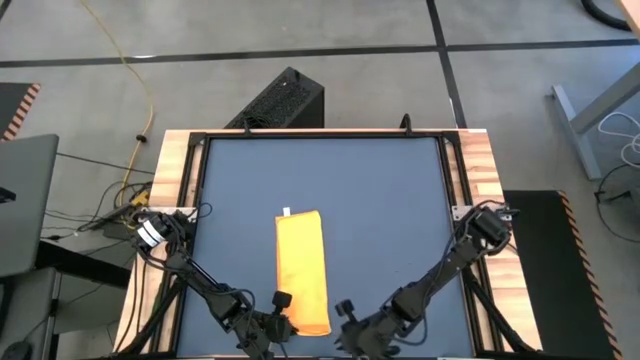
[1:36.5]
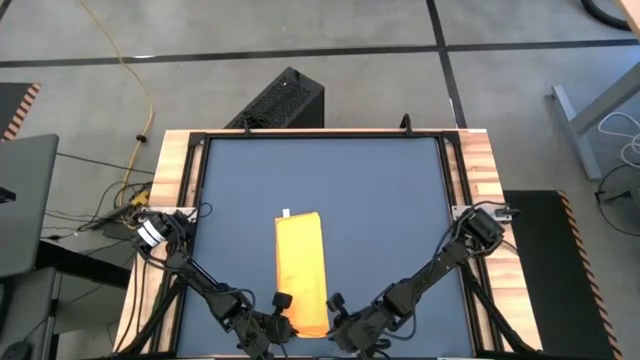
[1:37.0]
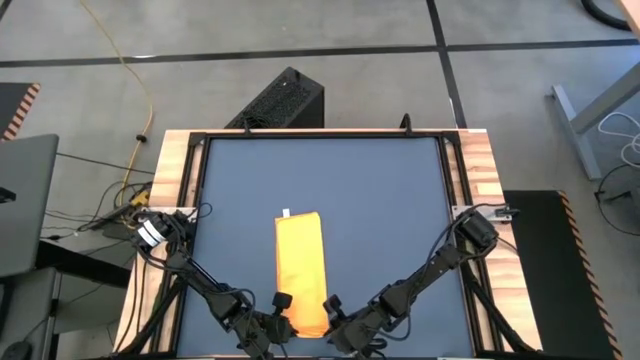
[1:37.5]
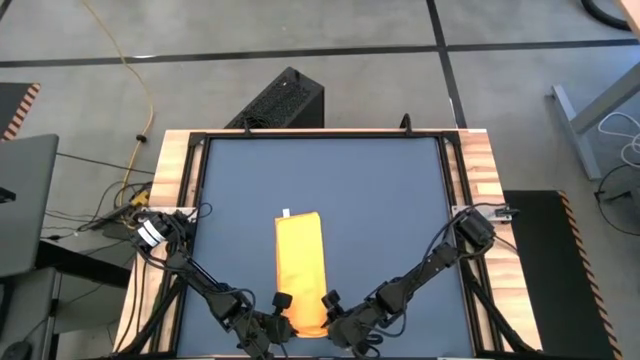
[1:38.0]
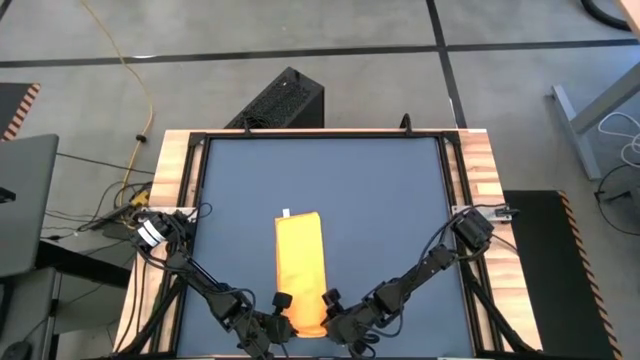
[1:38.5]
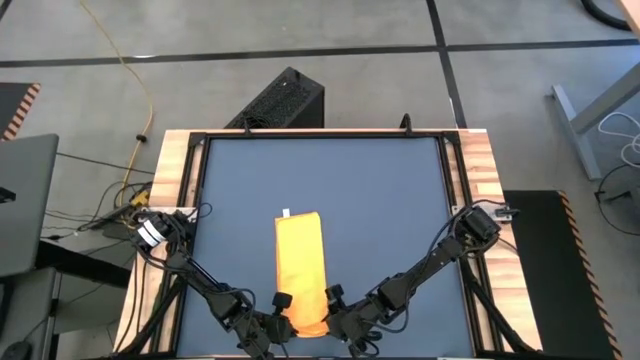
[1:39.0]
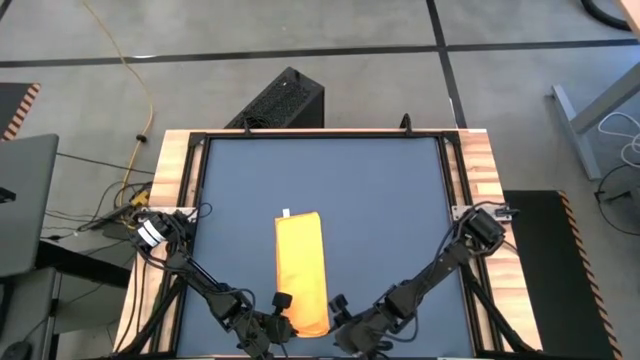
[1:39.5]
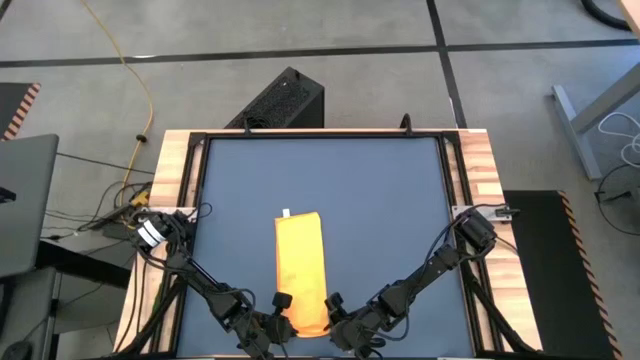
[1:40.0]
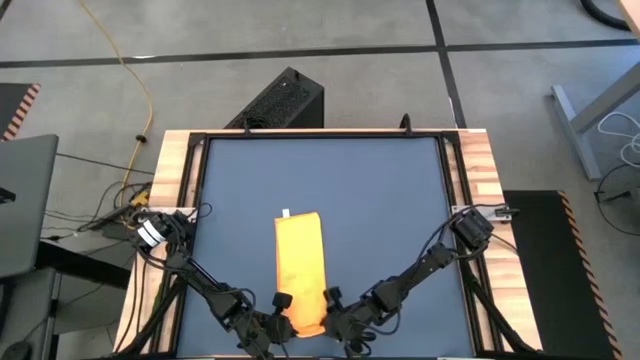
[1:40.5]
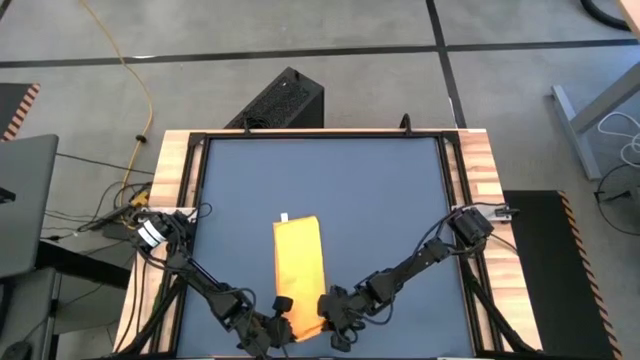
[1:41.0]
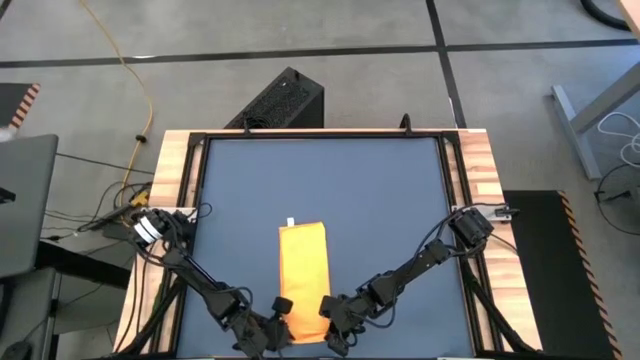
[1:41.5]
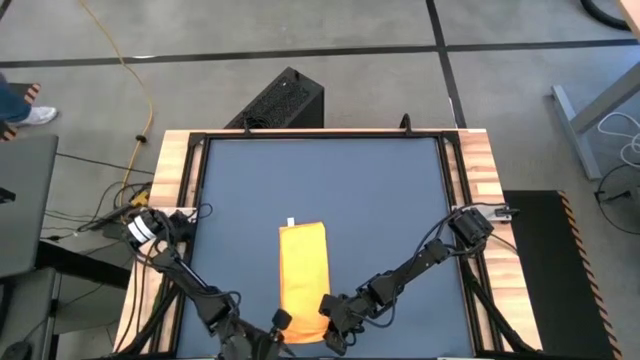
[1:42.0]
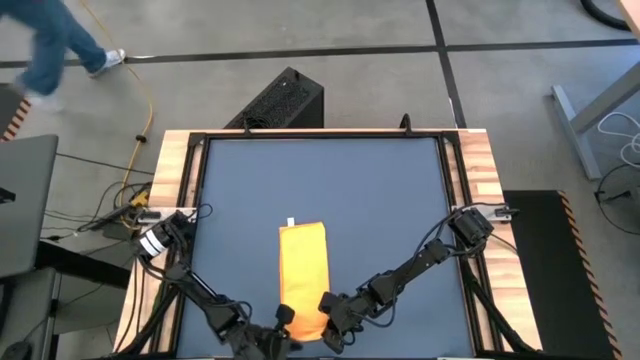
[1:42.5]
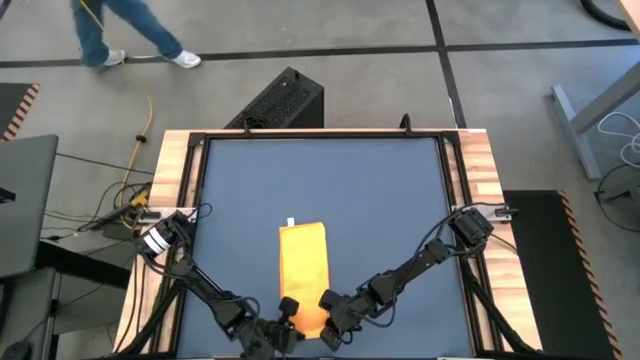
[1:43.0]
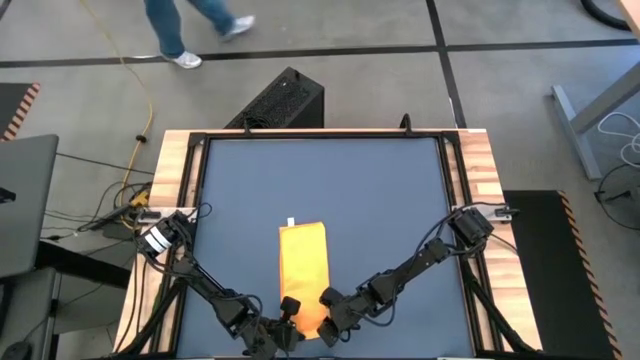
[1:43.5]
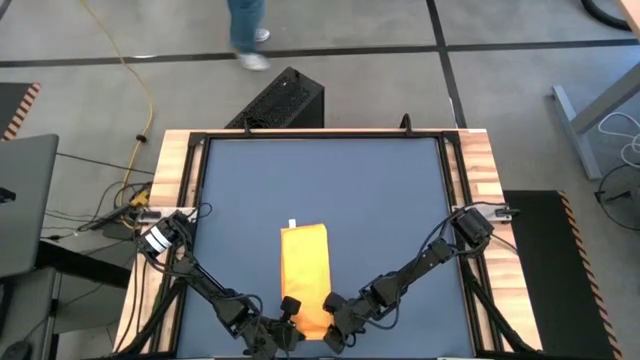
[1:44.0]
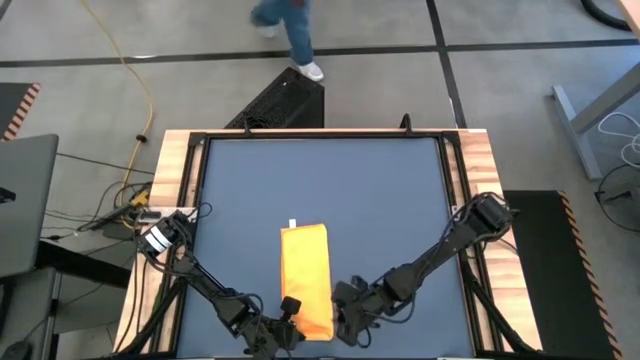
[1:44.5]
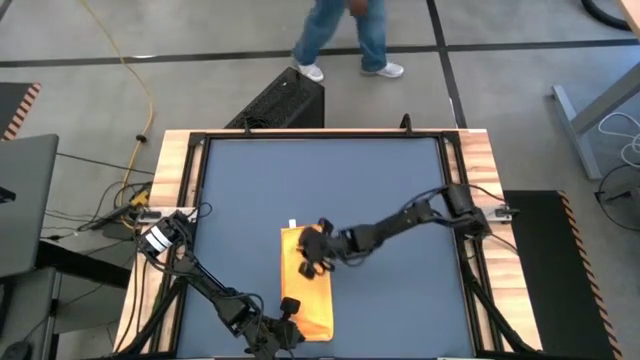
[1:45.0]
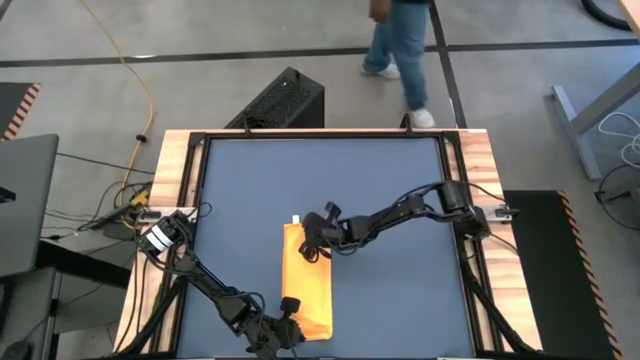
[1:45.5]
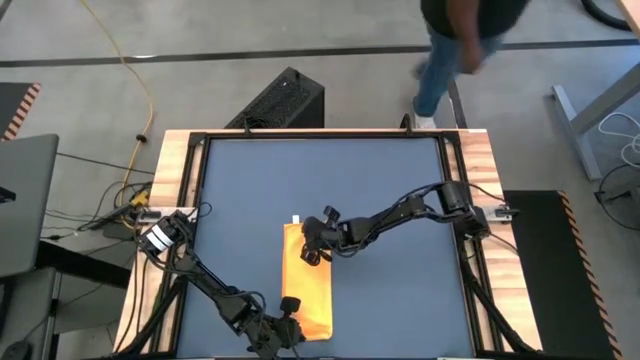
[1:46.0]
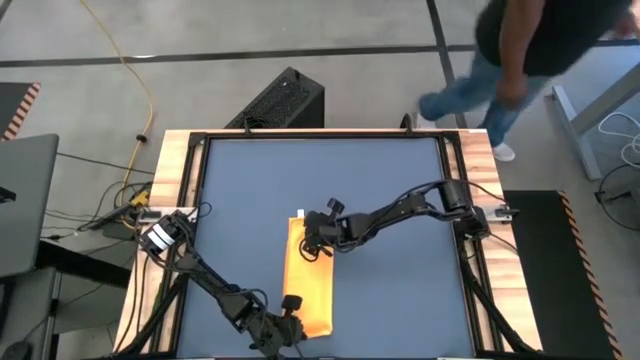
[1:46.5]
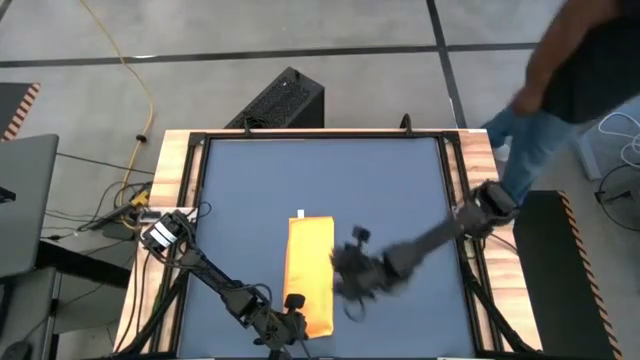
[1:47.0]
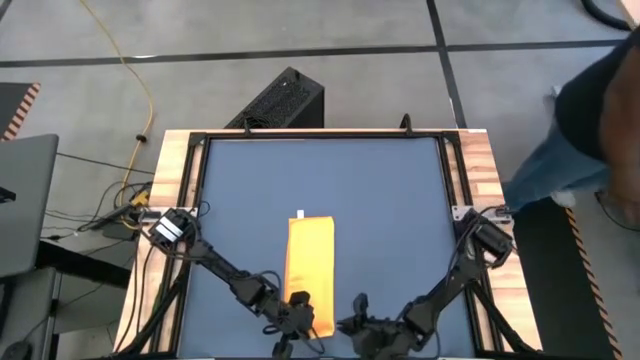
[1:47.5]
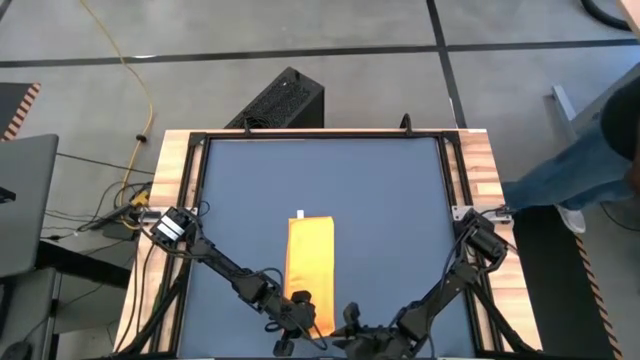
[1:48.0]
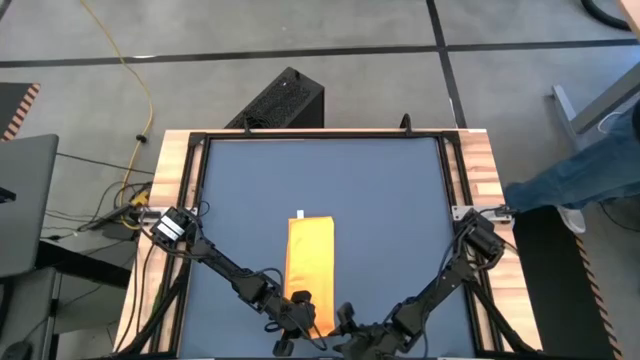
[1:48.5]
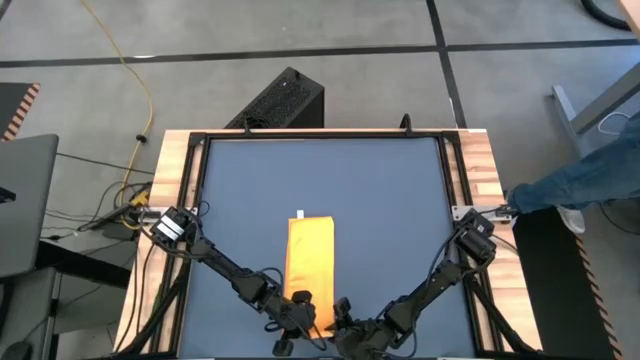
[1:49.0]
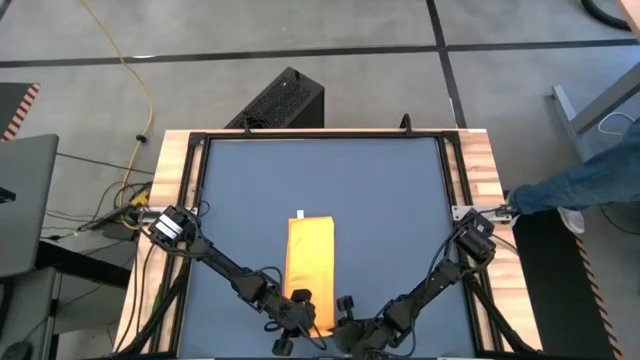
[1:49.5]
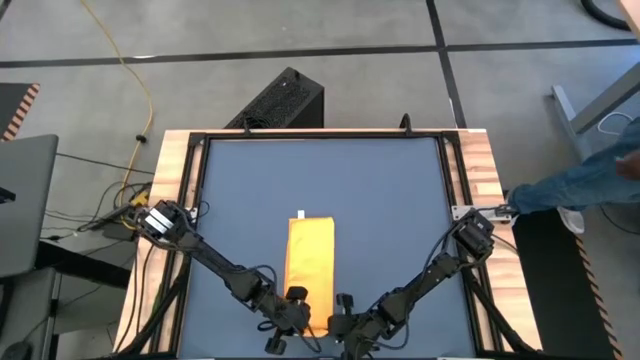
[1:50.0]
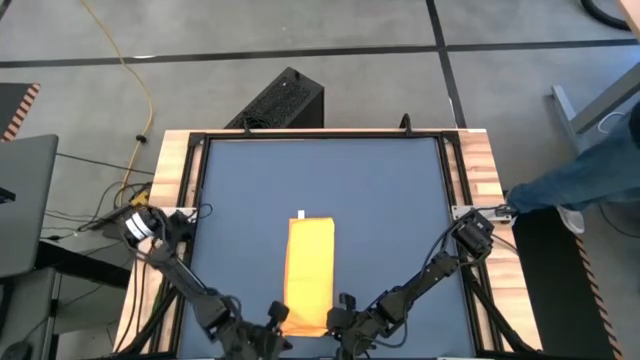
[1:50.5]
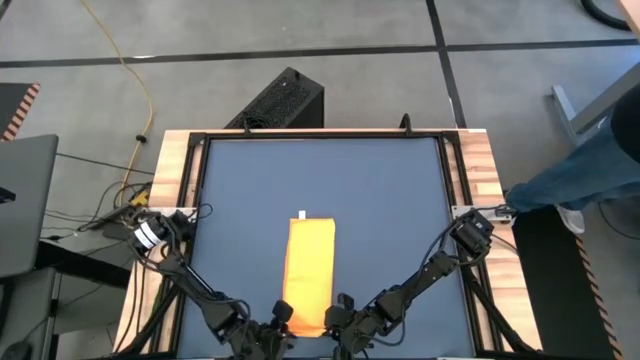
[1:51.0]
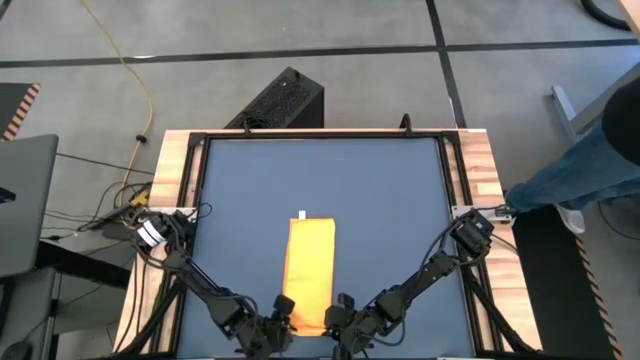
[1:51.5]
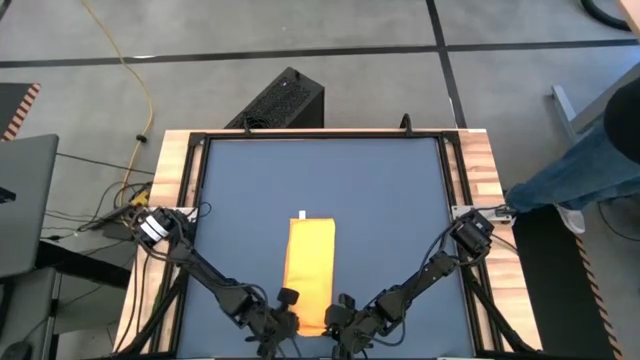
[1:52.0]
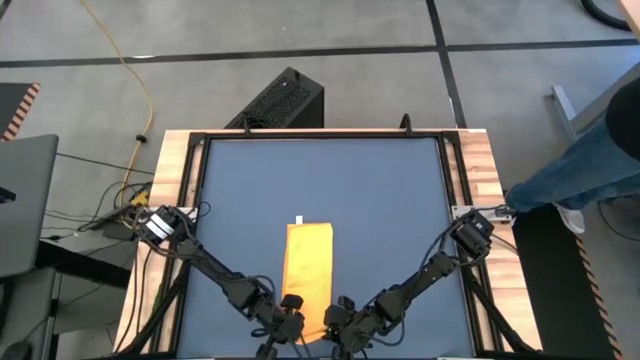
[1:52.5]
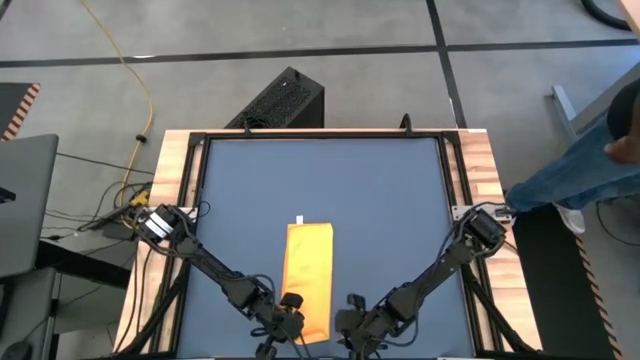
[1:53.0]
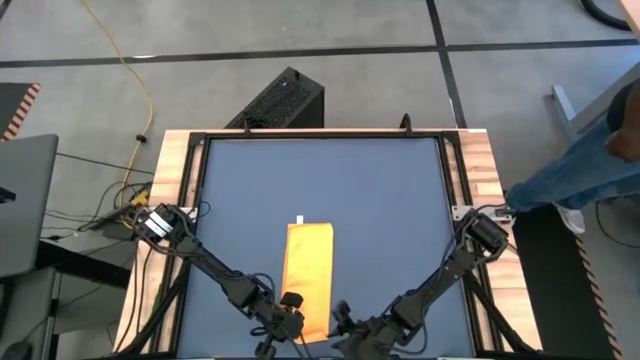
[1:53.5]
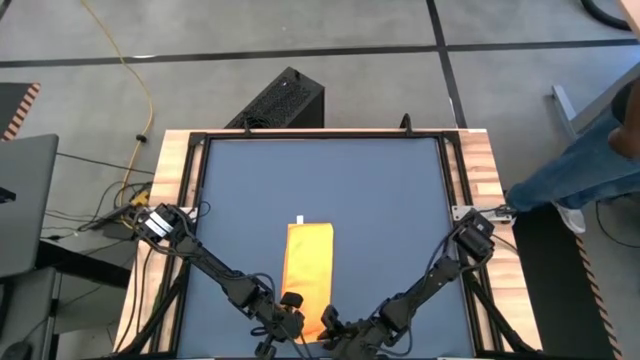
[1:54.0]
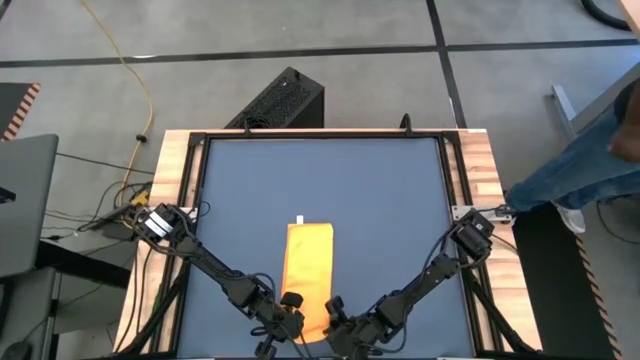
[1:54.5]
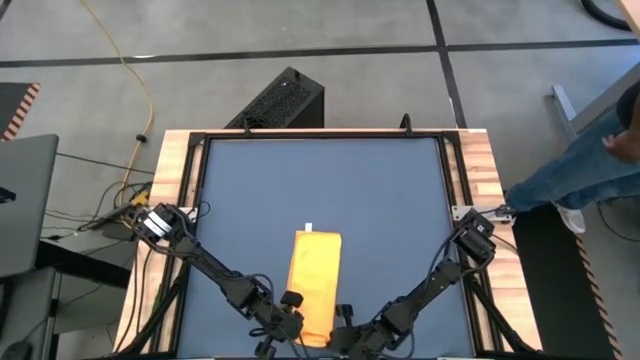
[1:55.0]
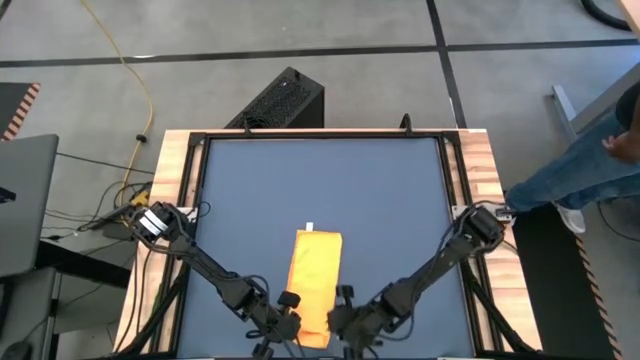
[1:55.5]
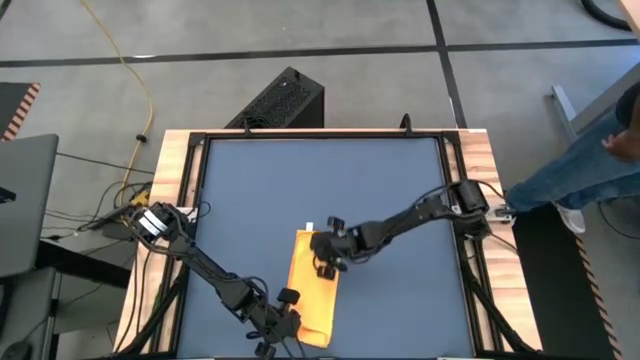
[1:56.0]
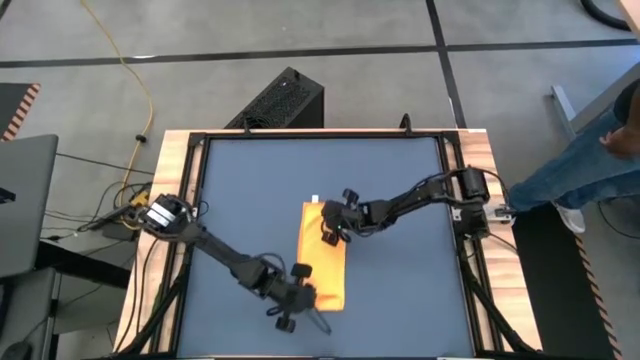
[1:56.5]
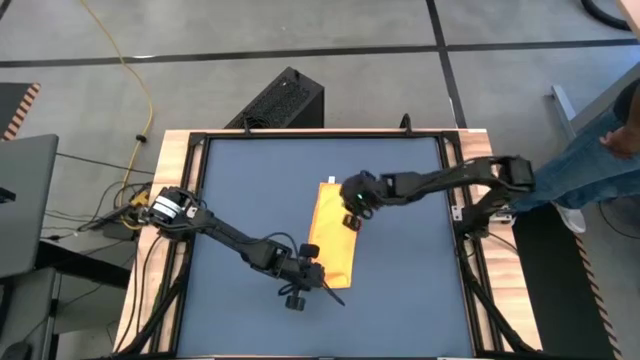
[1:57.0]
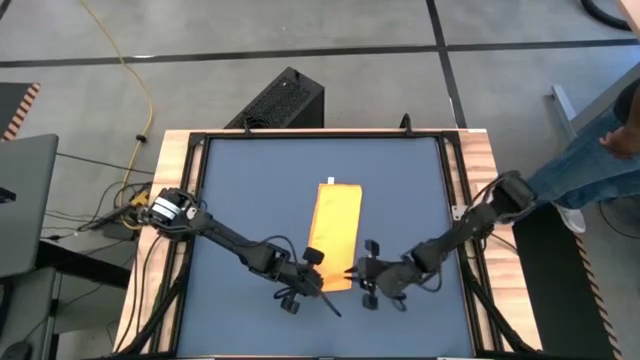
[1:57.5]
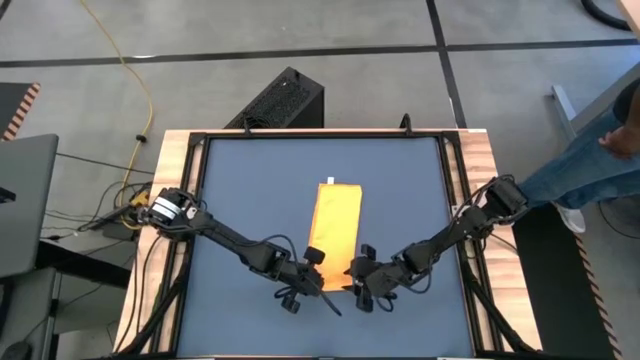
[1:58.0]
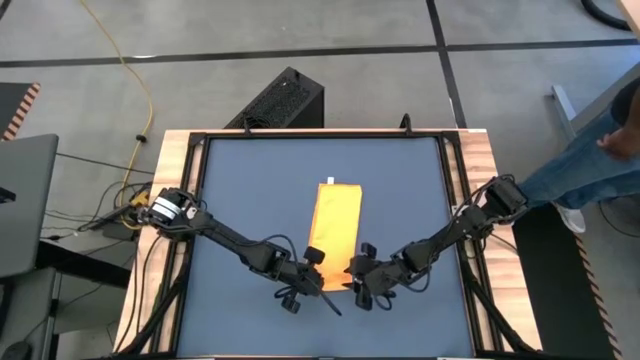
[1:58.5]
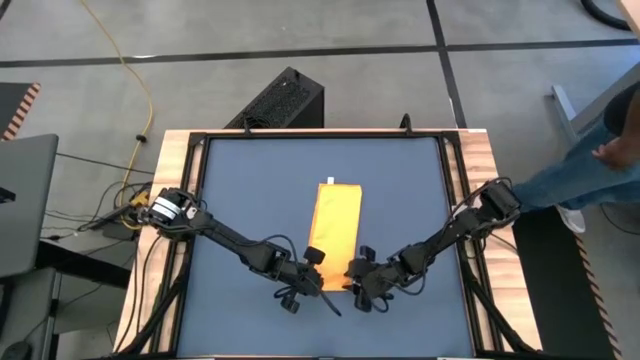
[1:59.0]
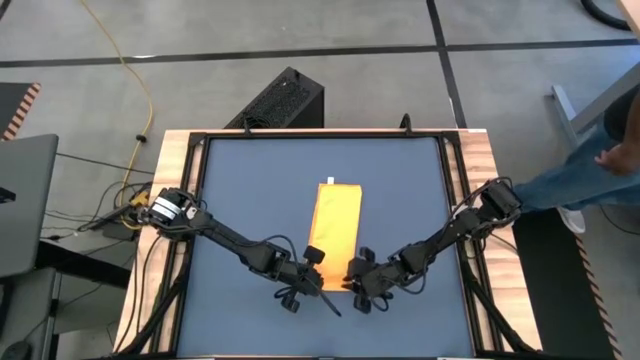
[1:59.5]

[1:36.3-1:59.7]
Task: Roll towel into tight, uniform cylinder
Roll the orange towel
